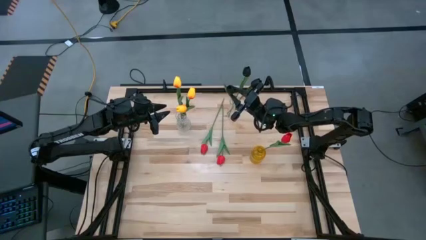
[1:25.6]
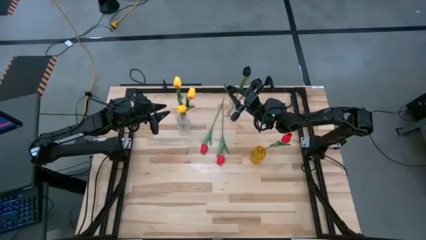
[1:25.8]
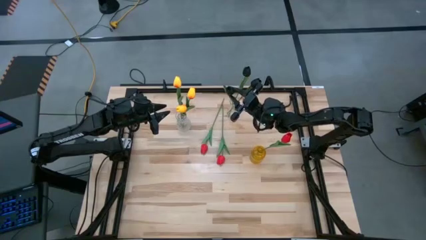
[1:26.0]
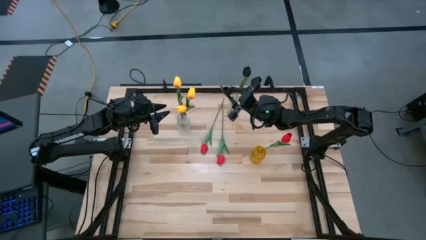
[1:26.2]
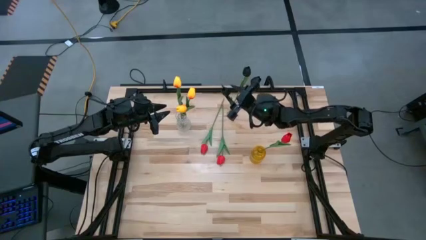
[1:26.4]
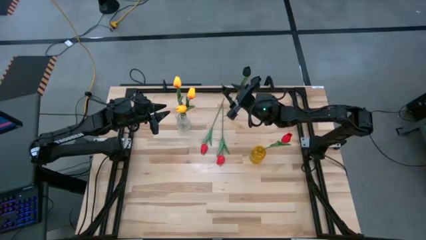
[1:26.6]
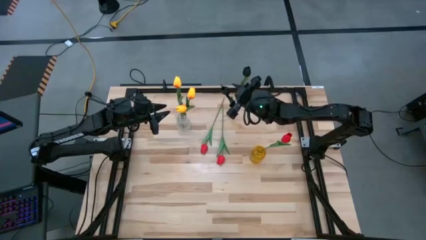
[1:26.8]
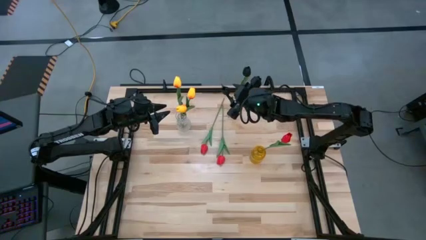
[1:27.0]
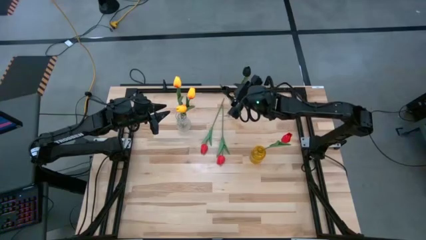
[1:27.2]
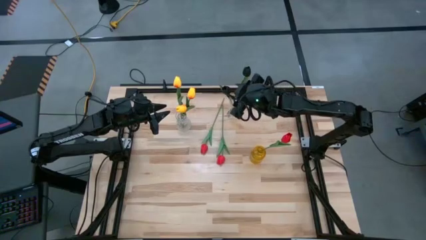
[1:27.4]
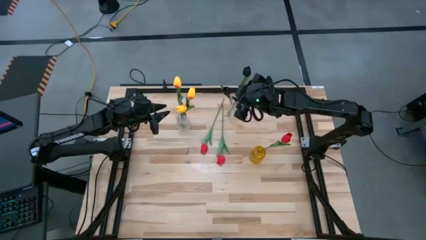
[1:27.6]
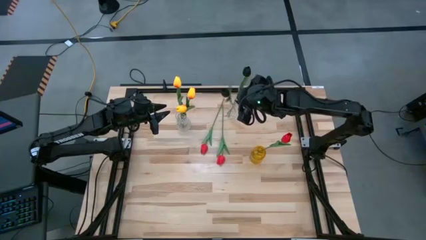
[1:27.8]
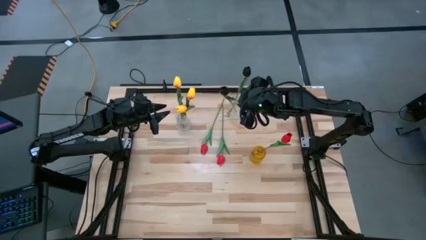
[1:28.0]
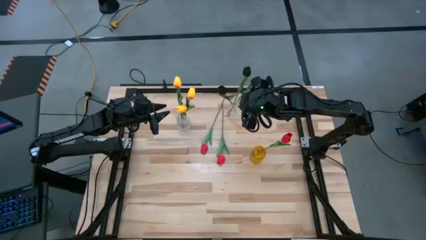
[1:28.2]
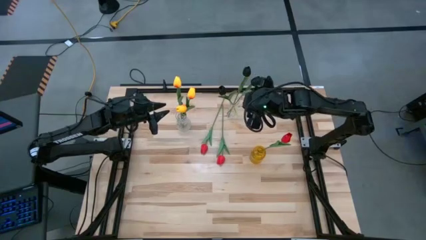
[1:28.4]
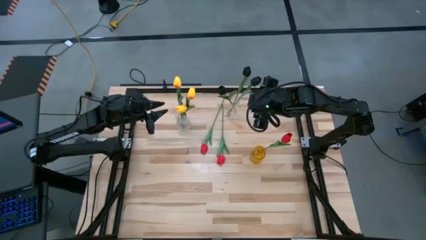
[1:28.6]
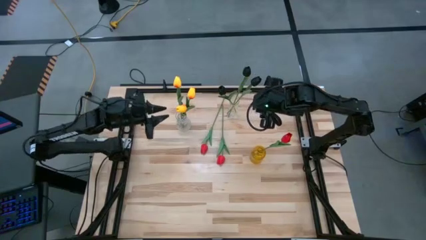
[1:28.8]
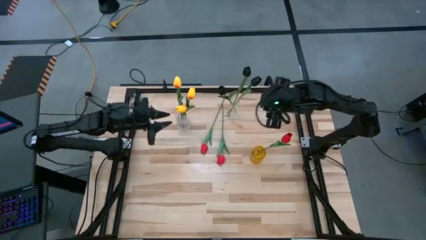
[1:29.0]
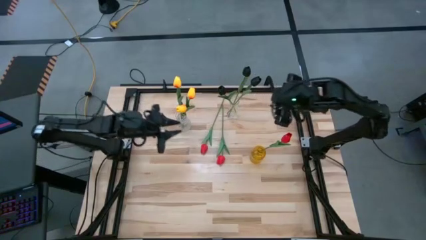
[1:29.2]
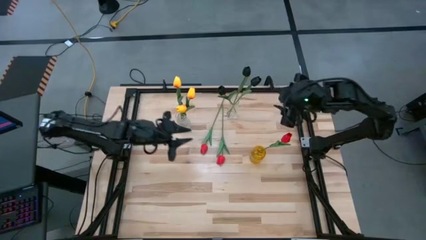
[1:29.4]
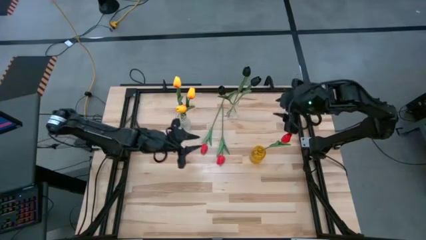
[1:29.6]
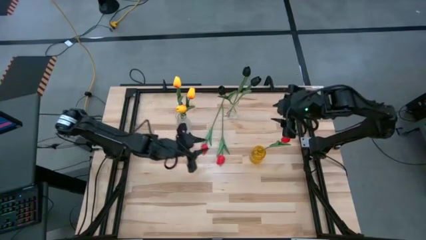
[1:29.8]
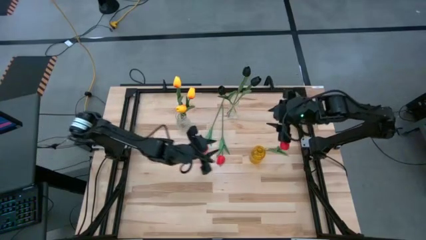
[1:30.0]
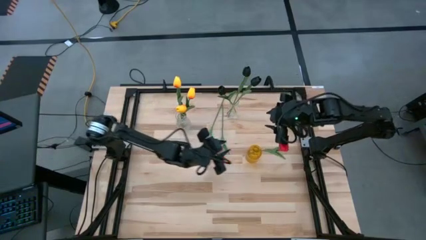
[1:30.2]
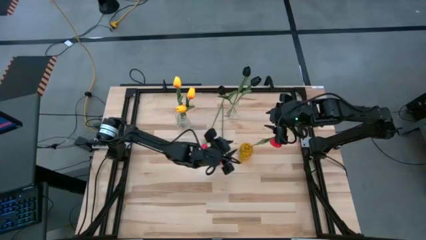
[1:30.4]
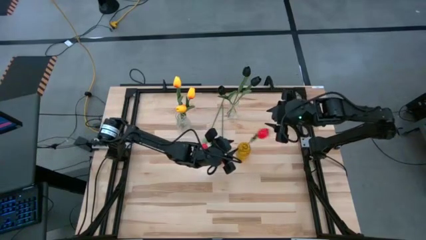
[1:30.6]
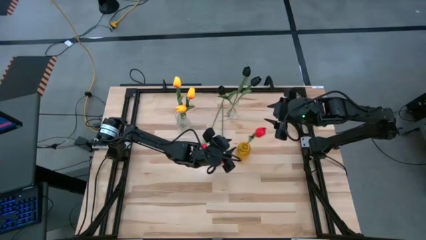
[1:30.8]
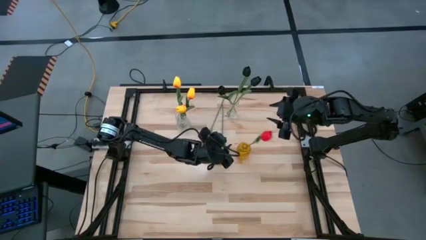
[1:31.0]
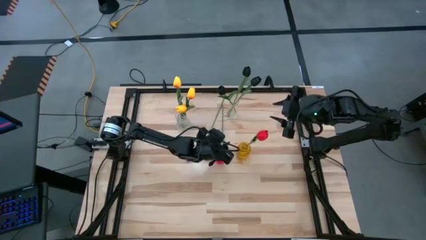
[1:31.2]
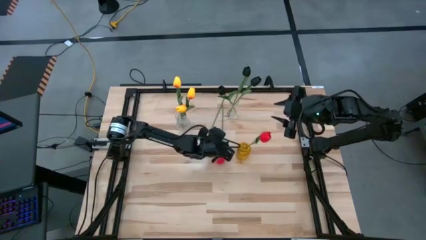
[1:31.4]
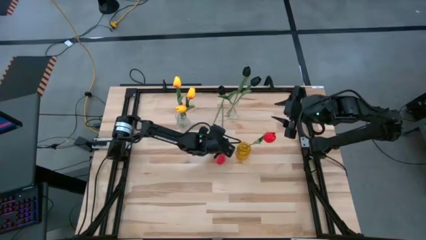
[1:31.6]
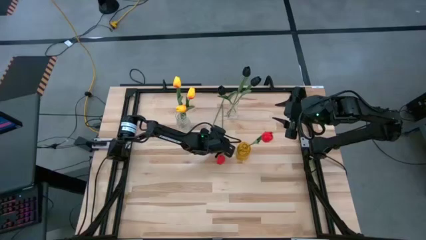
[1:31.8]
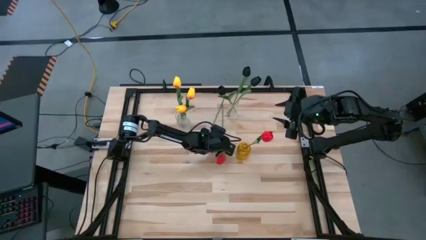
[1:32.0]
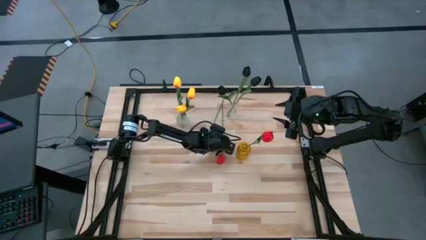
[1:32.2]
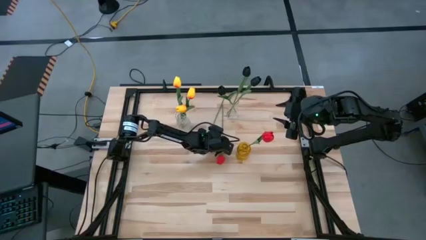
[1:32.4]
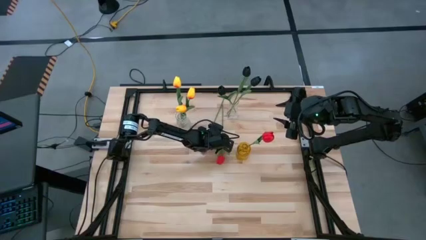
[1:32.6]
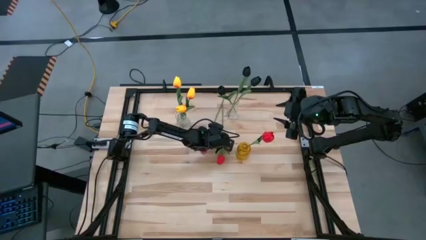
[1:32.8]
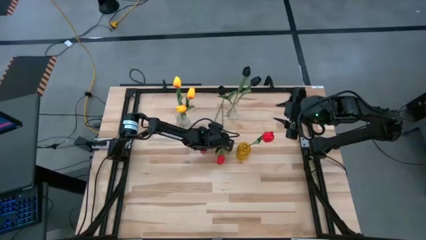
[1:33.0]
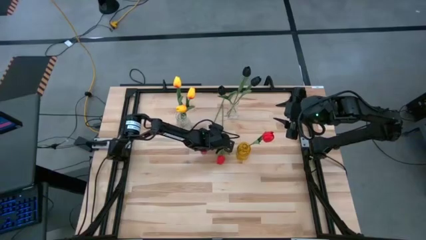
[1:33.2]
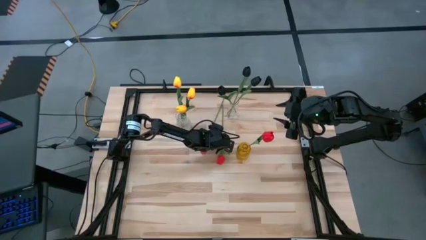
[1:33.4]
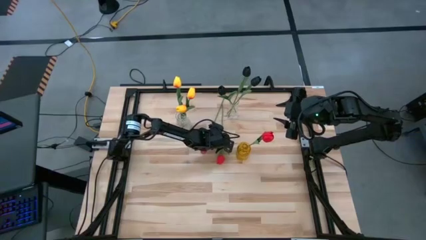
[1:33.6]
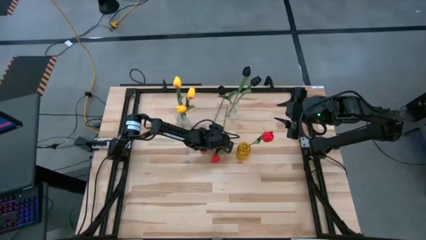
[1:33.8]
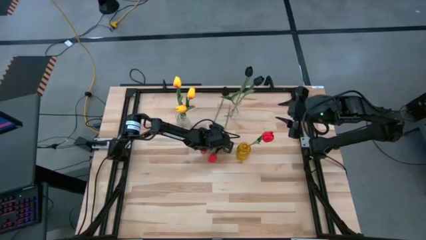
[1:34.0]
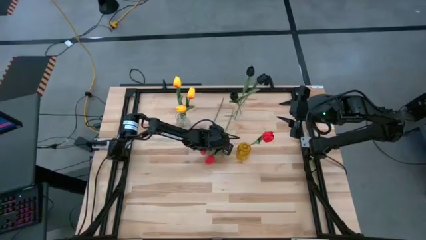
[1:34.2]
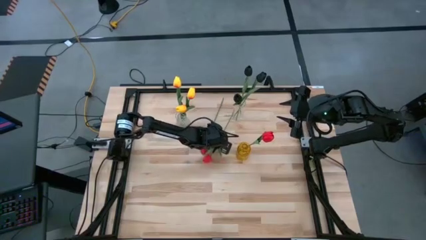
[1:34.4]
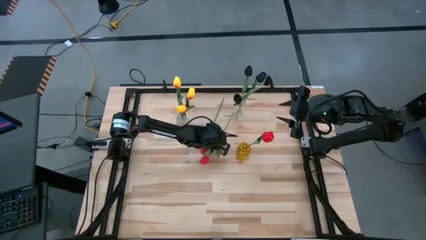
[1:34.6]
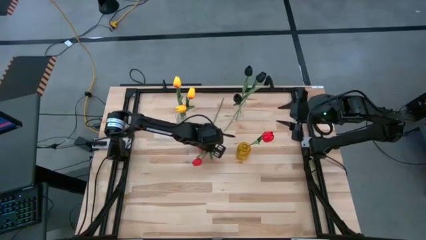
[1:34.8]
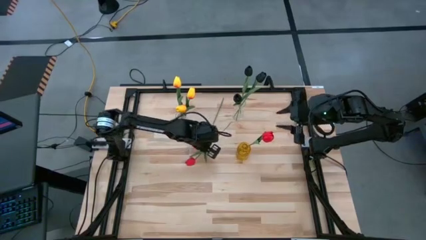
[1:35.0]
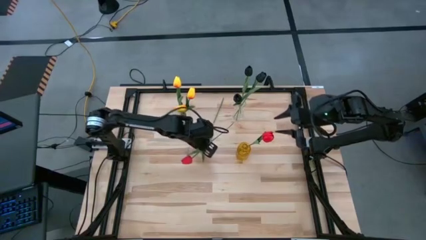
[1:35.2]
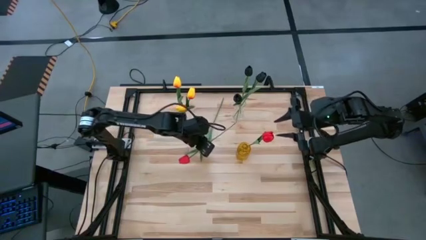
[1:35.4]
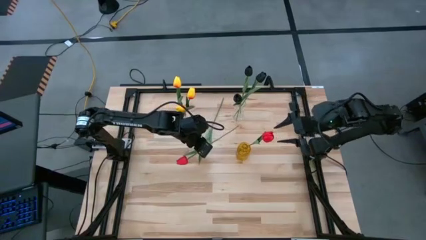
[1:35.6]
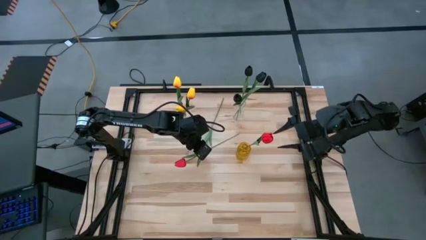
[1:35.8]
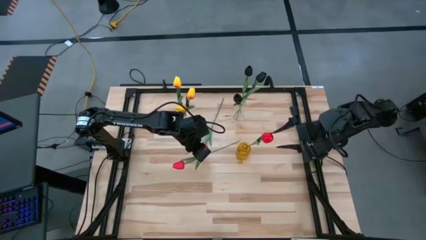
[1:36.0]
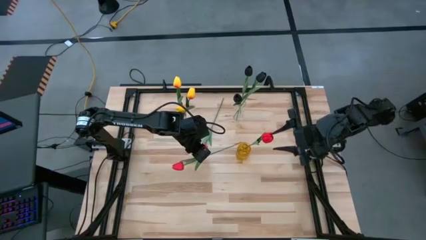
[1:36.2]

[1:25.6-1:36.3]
Task: Sort flowers into vase by color
Put the right red tulip into the yellow vase

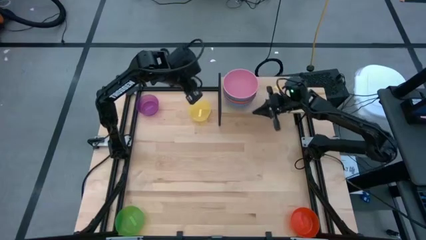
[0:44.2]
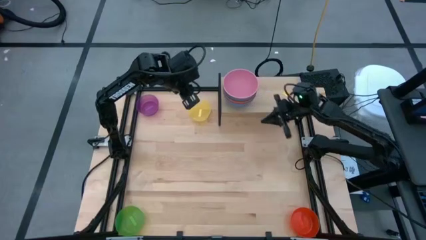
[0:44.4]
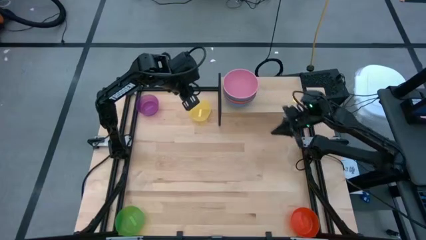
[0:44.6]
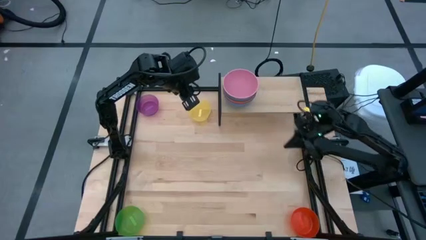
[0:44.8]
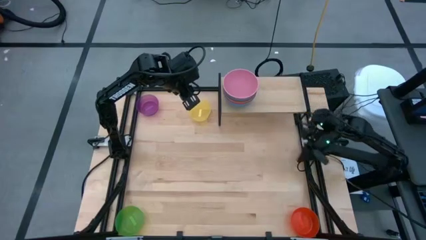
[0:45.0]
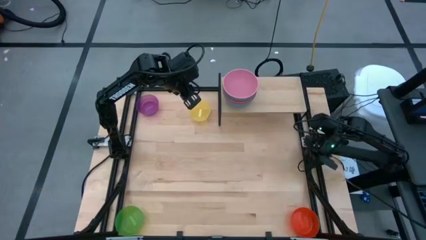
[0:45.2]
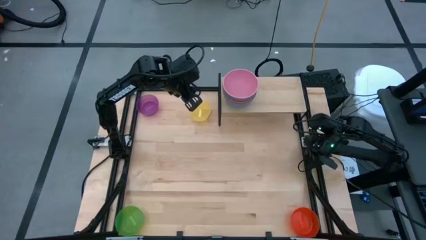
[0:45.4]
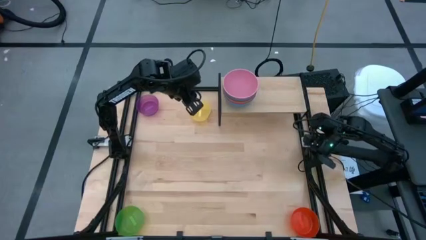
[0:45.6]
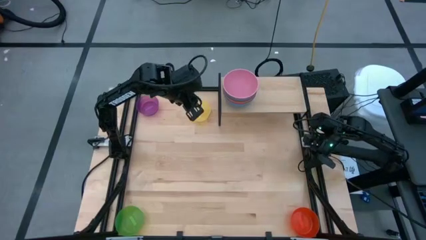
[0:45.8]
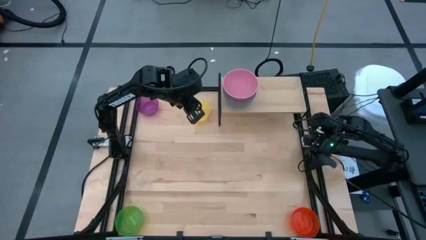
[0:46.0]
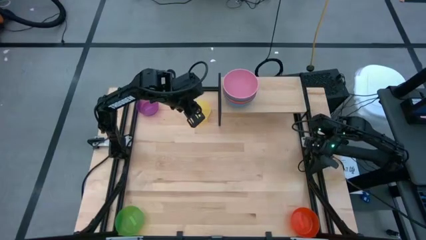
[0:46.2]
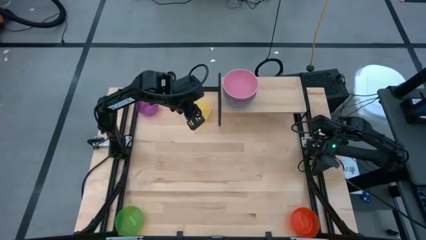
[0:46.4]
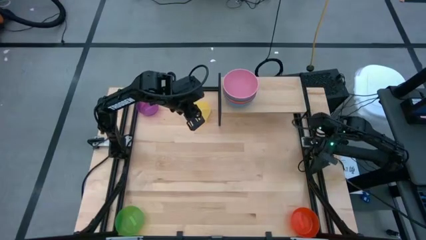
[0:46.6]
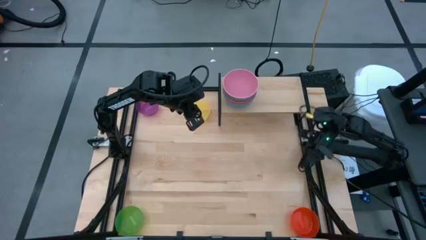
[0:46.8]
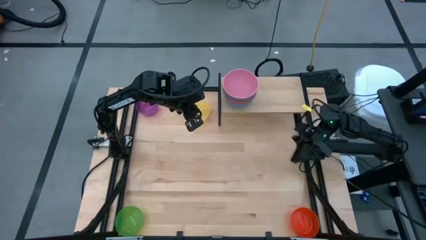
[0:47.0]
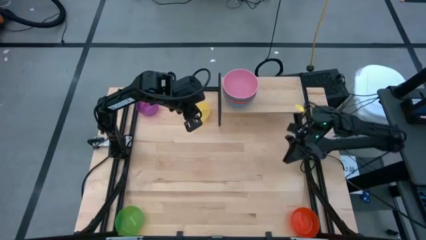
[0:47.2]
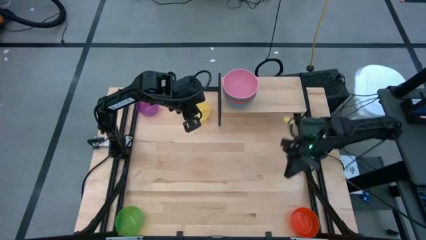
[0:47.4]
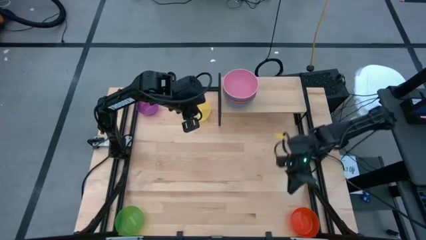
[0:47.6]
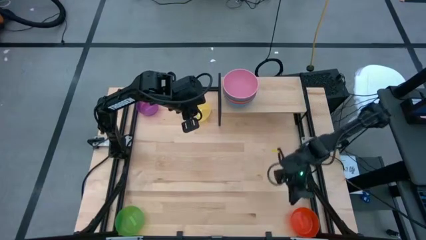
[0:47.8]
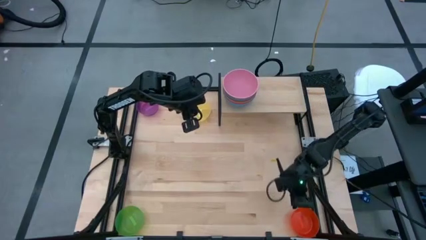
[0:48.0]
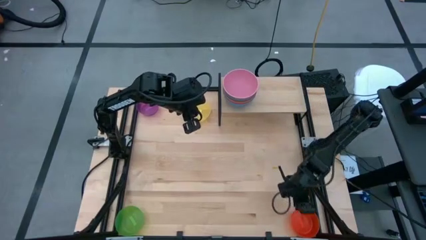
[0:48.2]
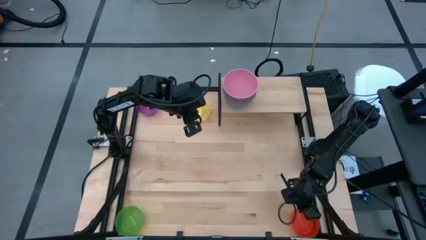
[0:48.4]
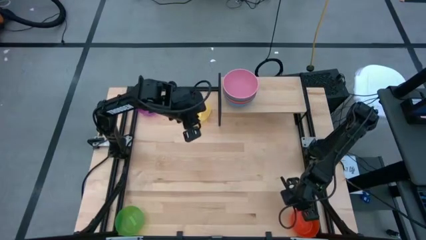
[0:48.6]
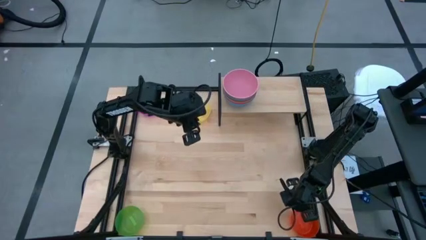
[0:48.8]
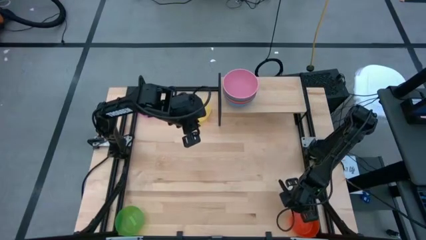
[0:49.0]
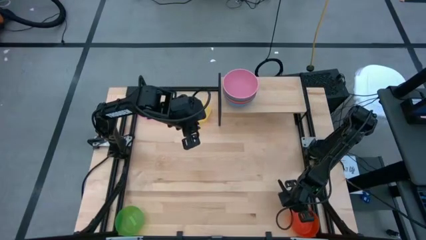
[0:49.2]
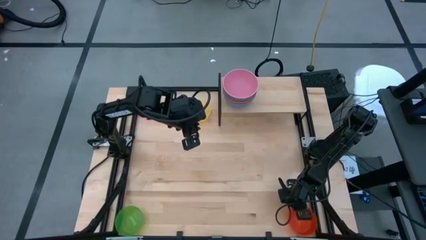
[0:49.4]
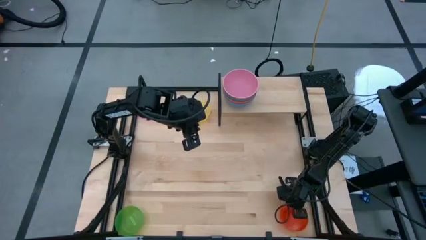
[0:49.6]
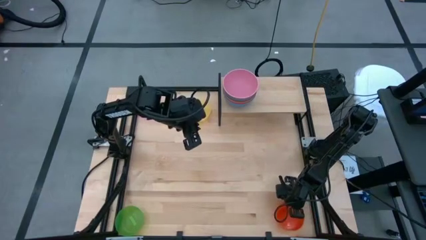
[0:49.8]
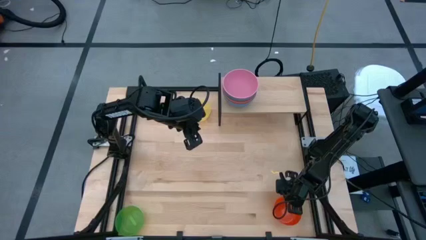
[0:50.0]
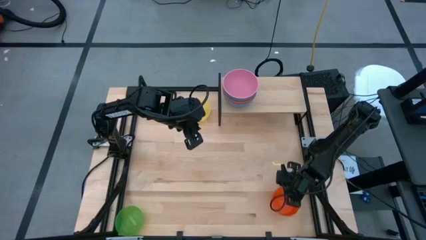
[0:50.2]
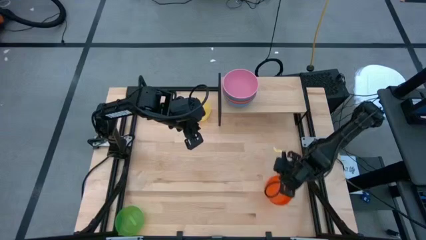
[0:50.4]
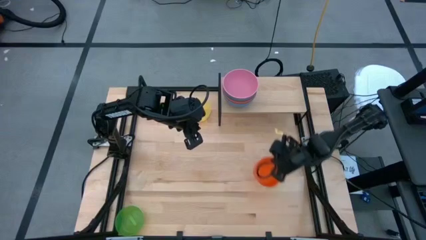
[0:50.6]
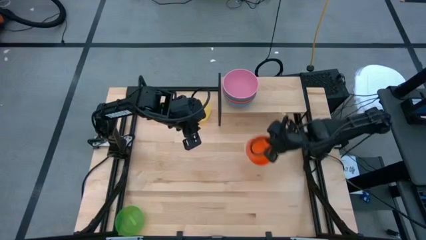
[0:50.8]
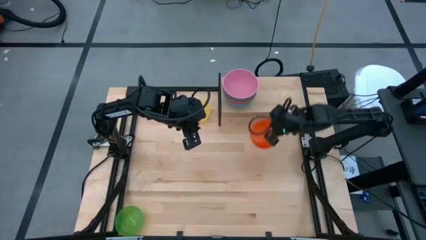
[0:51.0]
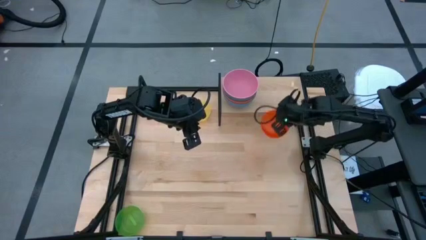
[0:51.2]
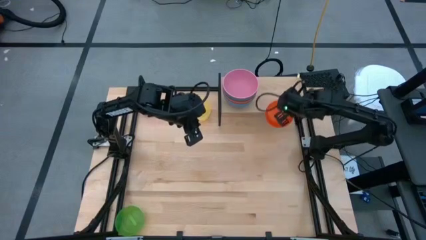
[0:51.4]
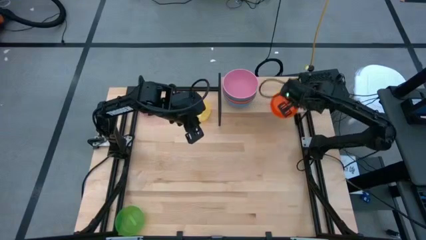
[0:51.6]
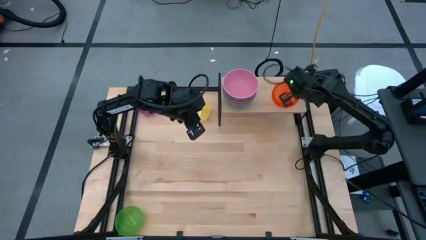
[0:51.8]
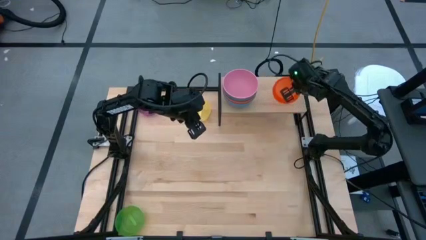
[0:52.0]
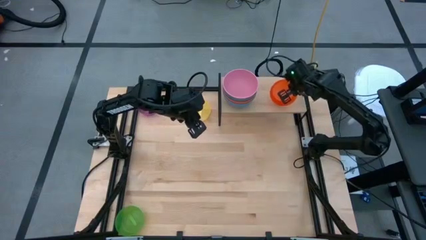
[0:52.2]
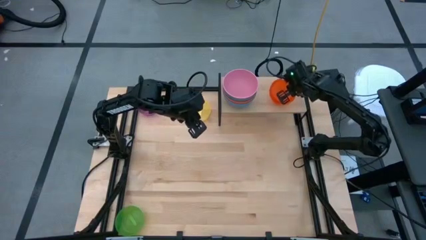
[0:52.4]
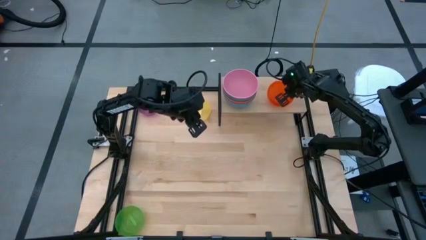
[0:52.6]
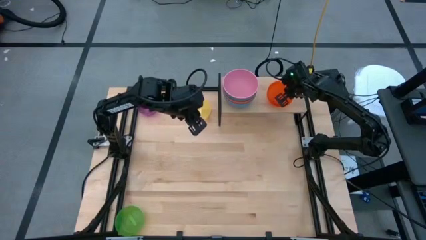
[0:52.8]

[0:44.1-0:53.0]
Task: Place and stack bowls onto a shelf
Adjust the stacked bowl on the shelf
